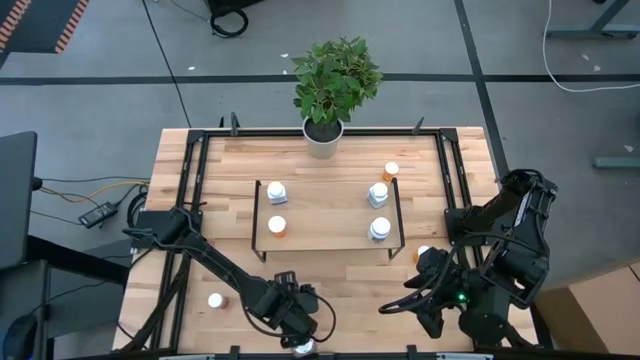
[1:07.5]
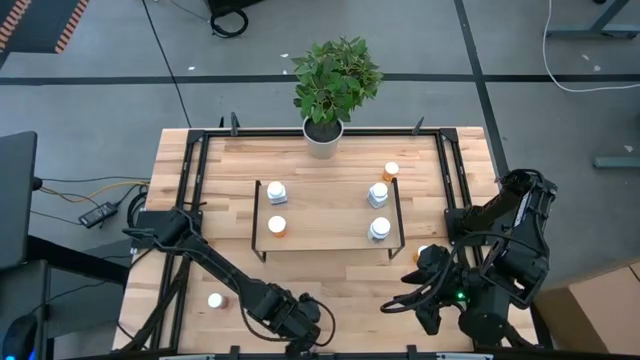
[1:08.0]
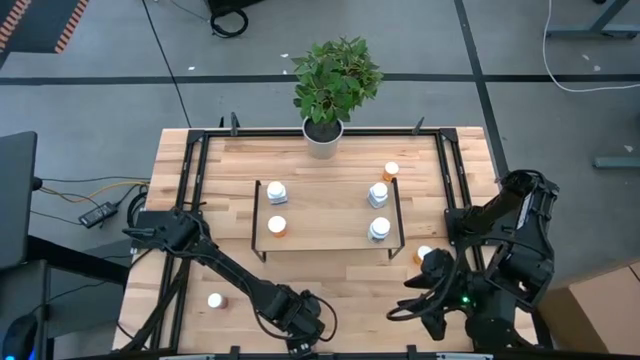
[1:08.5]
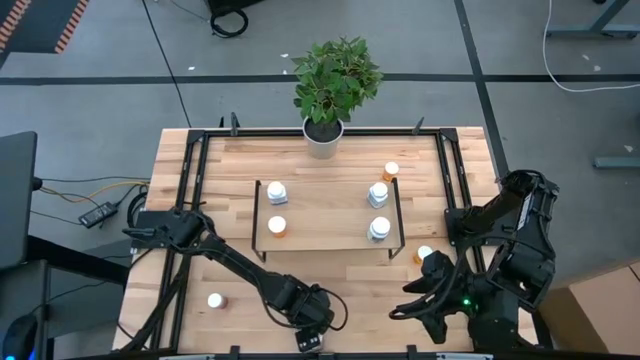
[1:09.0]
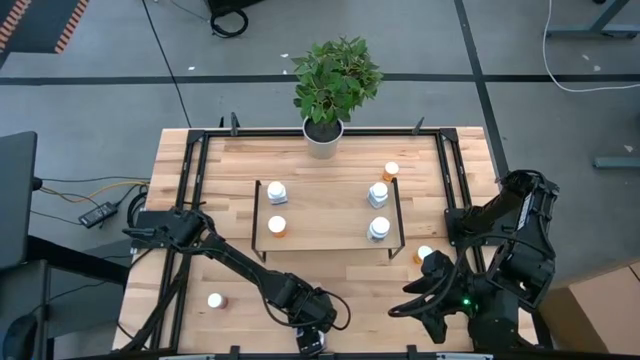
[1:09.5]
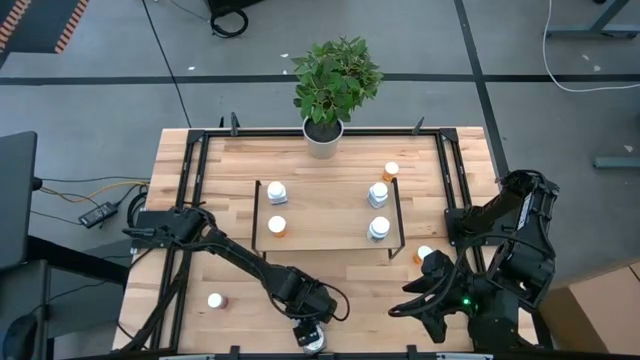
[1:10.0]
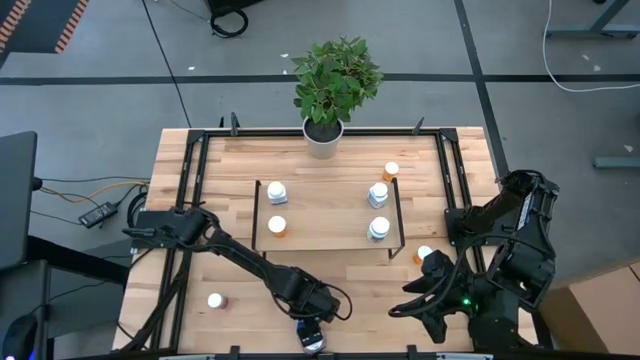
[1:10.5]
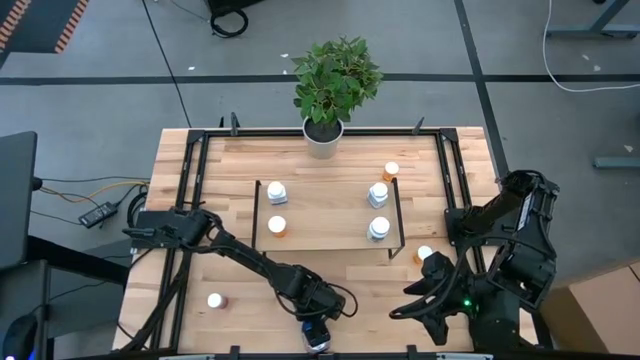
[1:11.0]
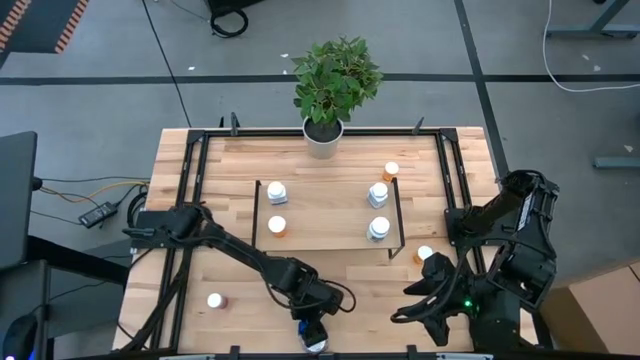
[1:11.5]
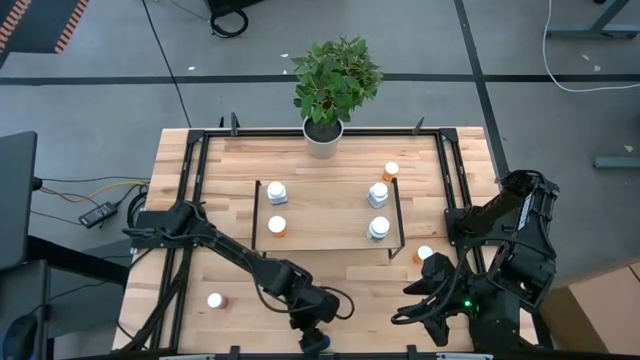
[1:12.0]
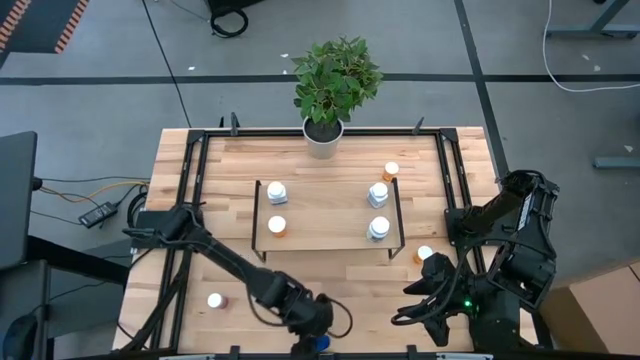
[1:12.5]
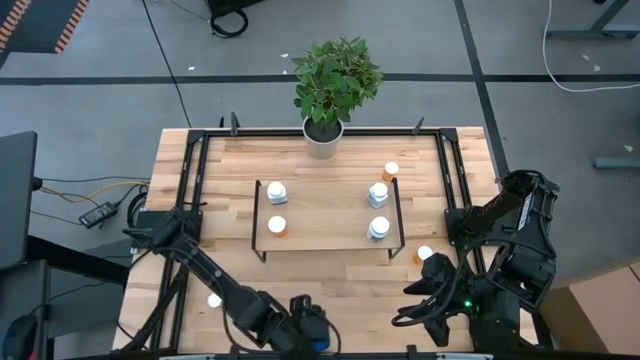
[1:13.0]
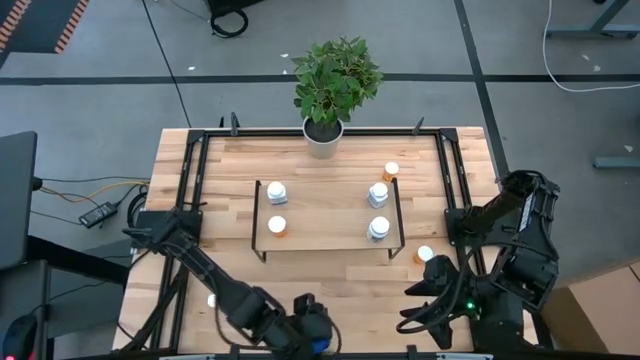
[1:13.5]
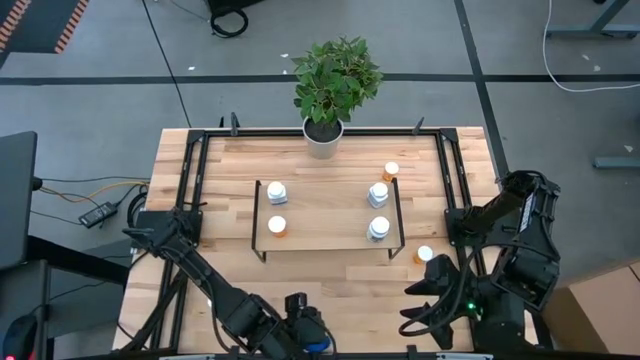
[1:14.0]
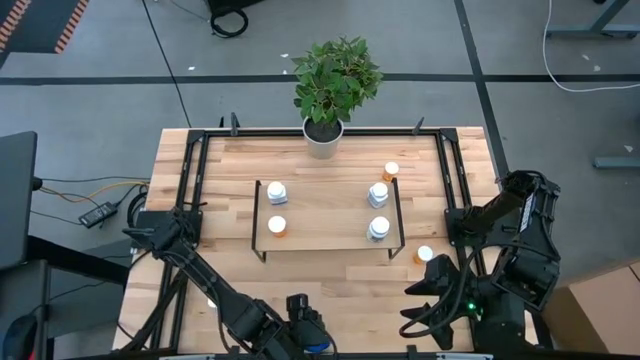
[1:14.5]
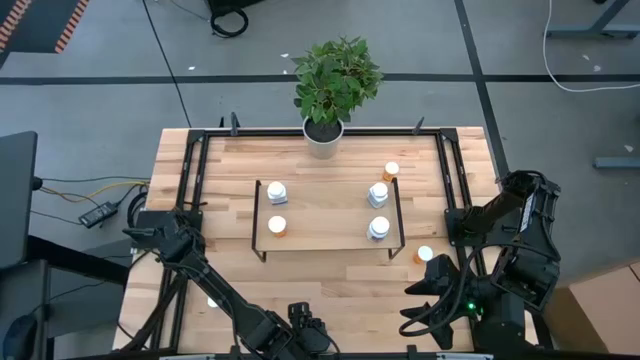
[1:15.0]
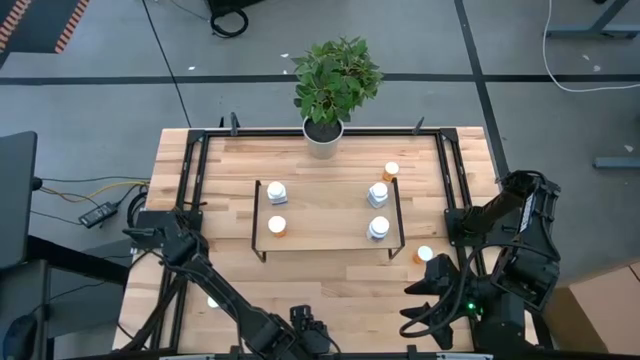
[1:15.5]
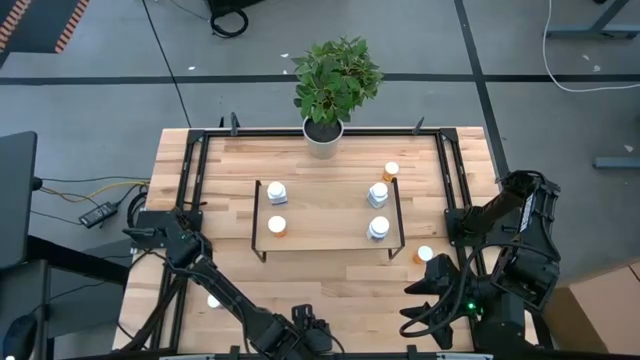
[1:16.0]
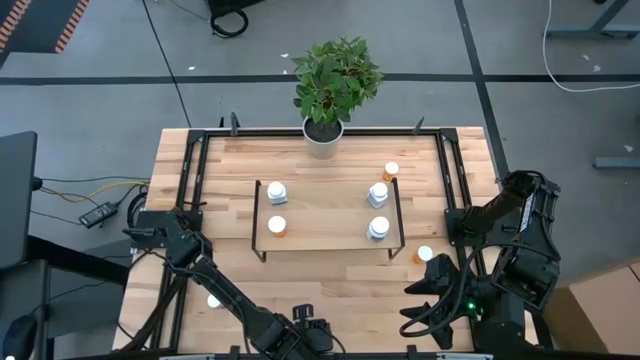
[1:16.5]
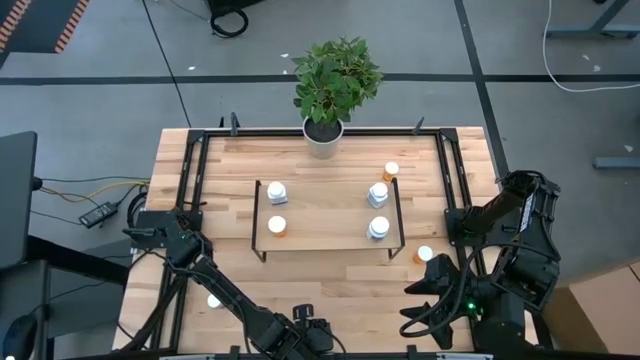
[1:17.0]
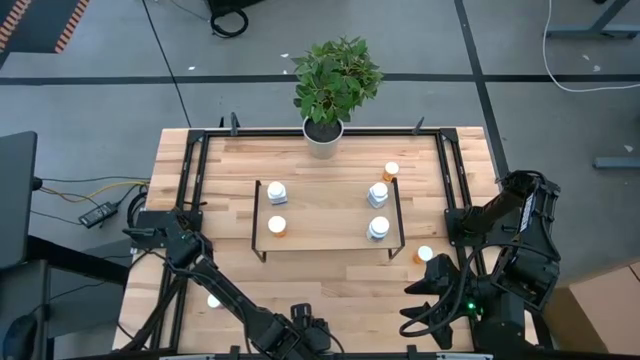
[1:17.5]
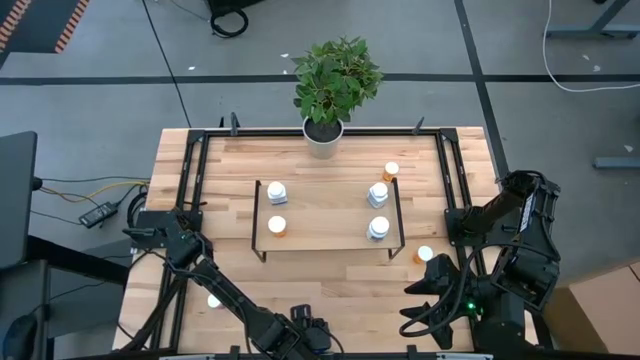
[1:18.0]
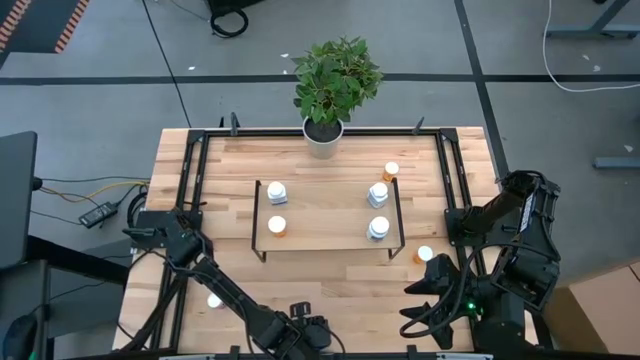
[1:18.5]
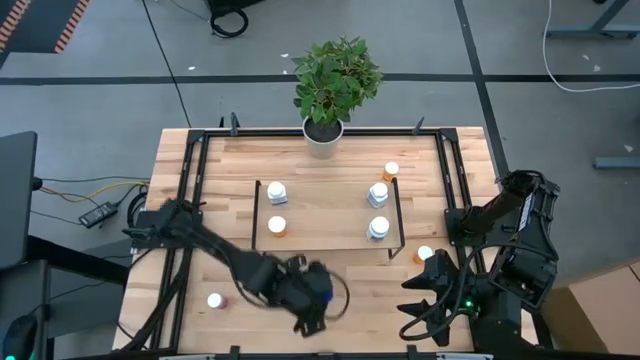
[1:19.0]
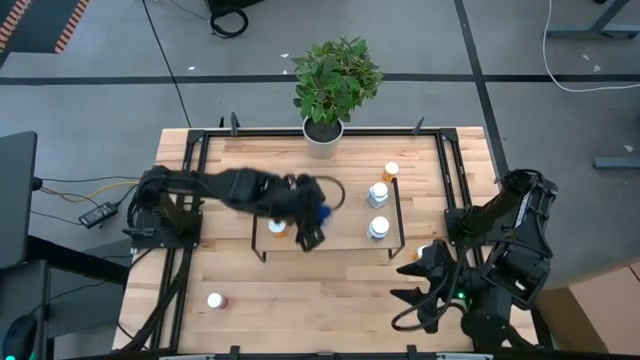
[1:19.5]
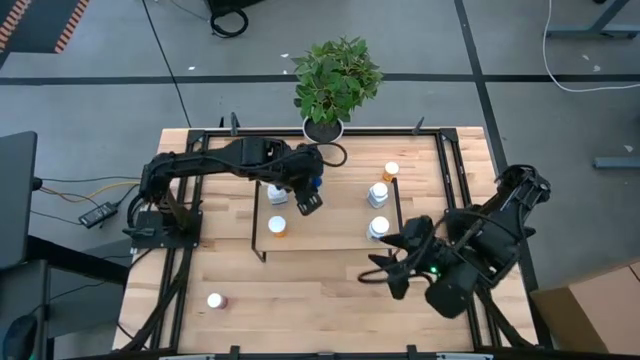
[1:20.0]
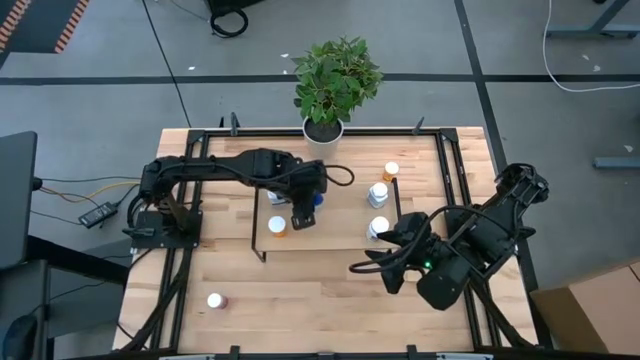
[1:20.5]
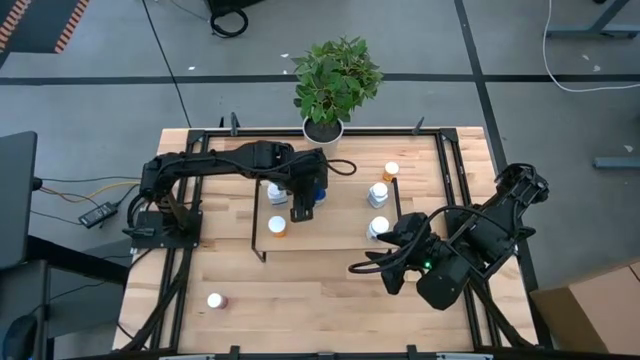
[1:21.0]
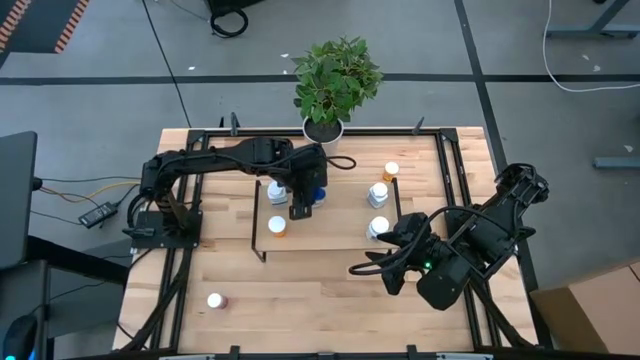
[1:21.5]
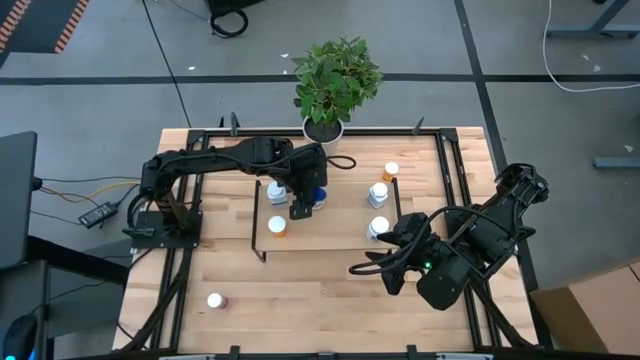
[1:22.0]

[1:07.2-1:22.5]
Task: Pick and place medicine bottles onto shelf by color
Put the blue pill bottle on the shelf

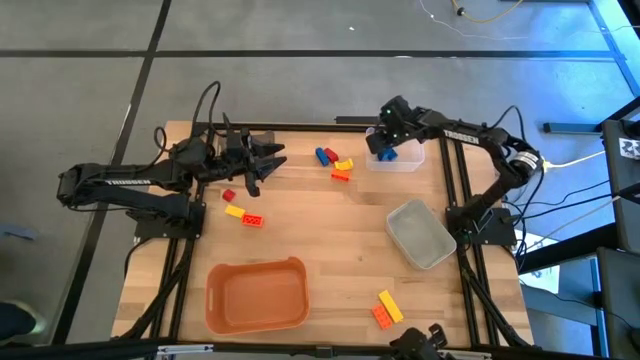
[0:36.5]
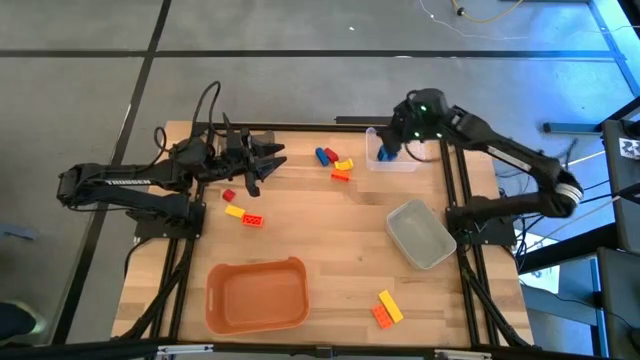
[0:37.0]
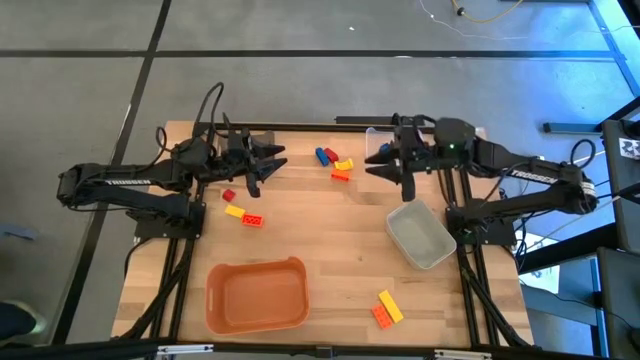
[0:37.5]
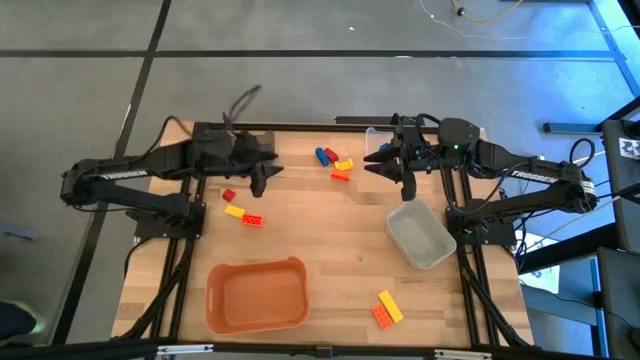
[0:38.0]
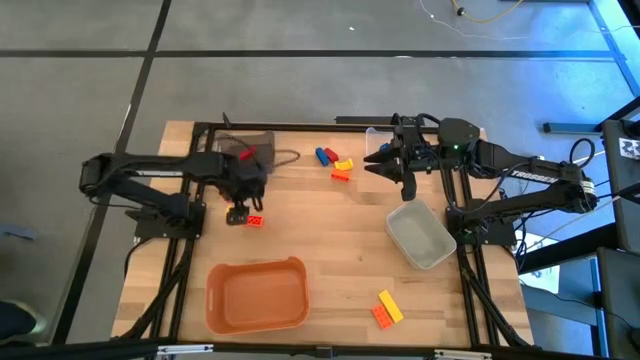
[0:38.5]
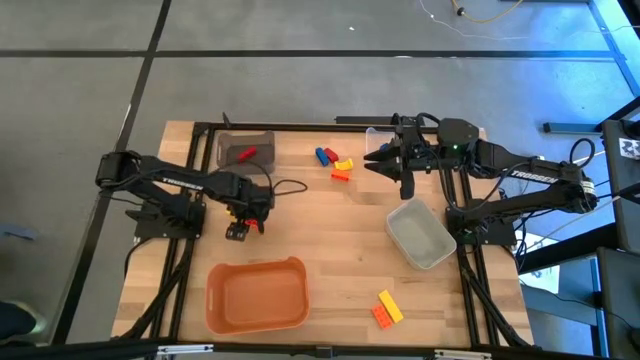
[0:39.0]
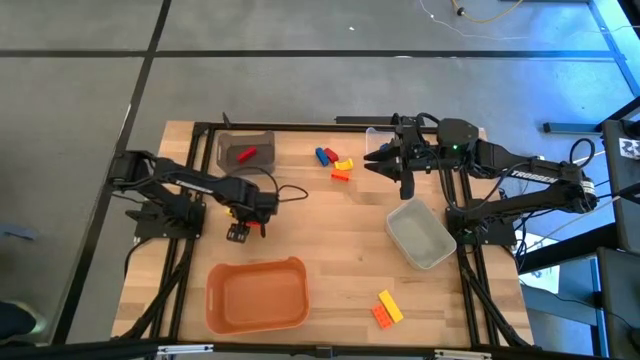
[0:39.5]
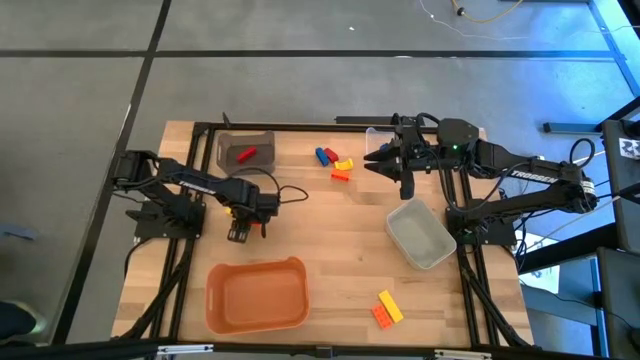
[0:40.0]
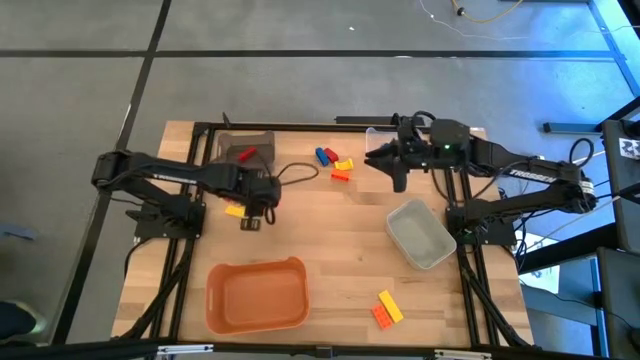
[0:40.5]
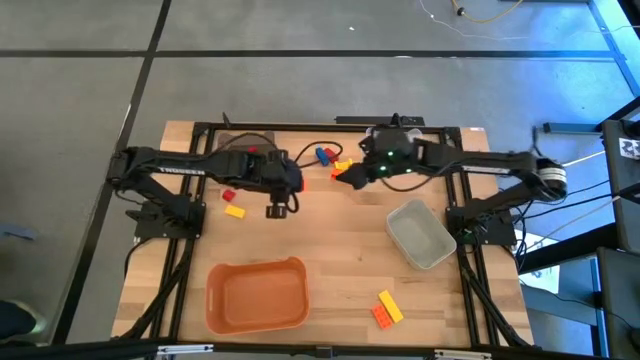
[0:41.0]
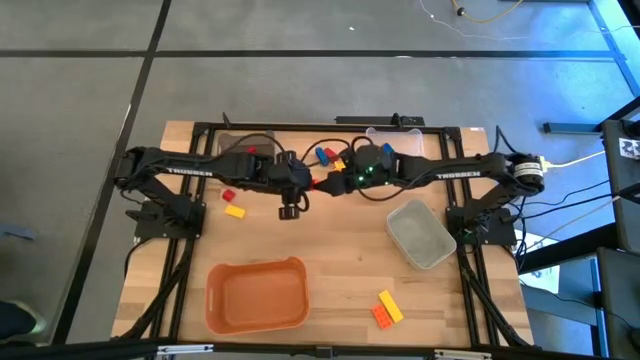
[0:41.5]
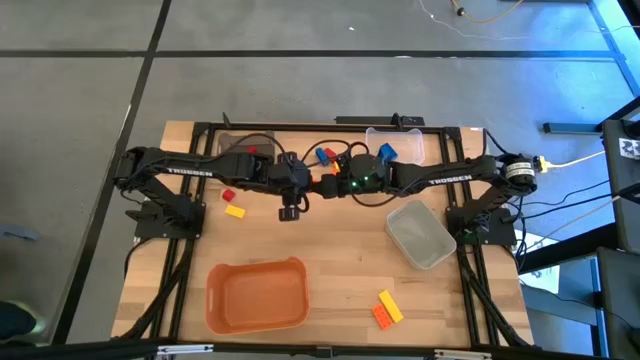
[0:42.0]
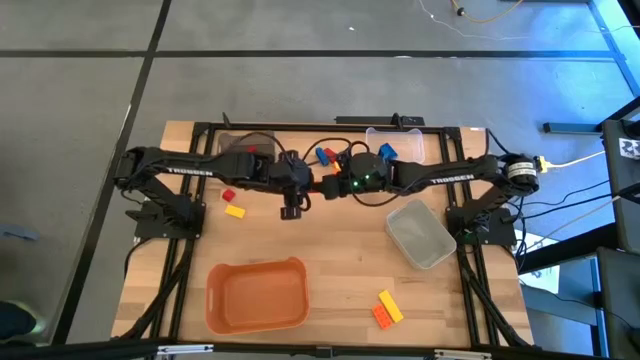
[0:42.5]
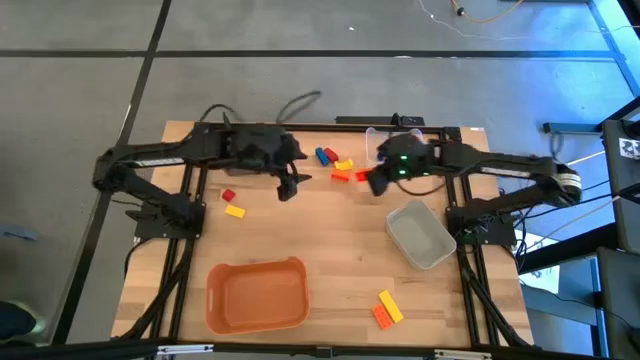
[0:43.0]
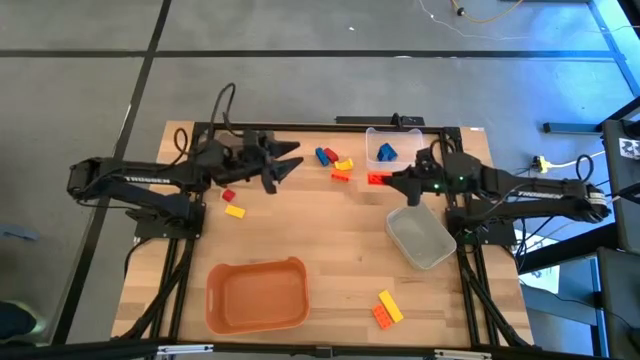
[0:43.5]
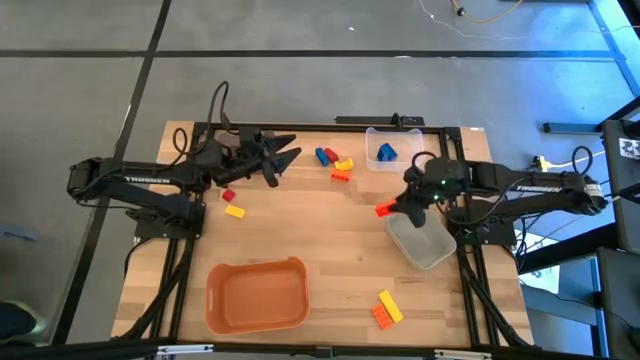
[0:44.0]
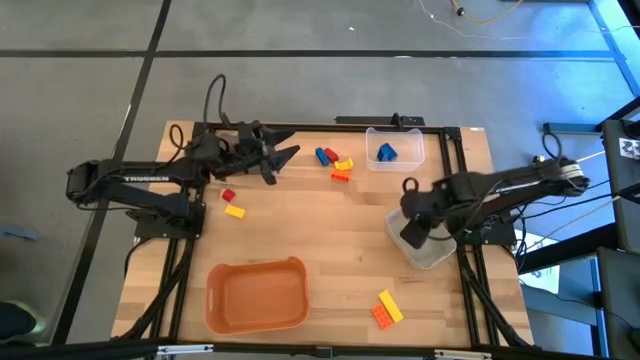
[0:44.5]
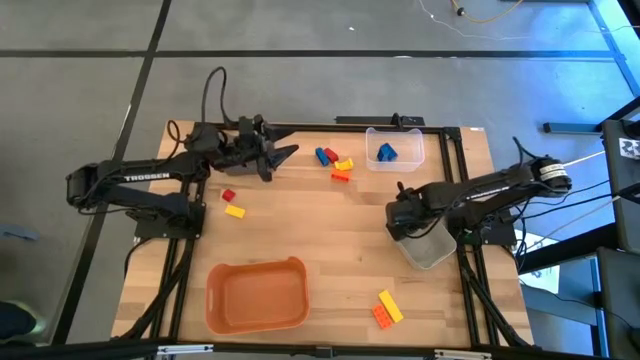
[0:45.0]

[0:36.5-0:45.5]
Task: Sort & place blocks by color
Put the middle orange game piece into the gray bin
